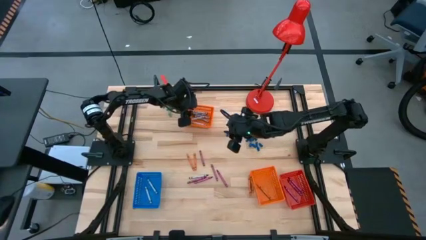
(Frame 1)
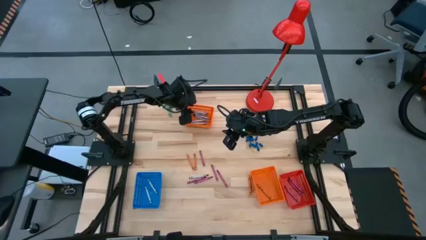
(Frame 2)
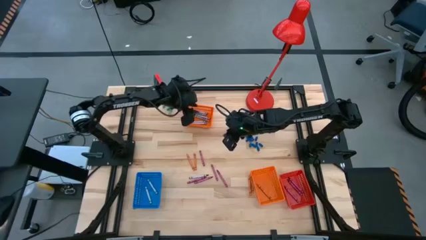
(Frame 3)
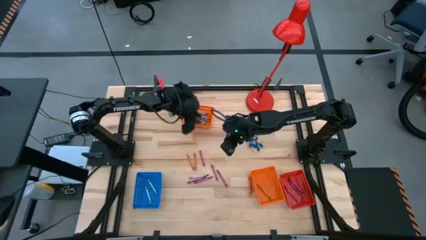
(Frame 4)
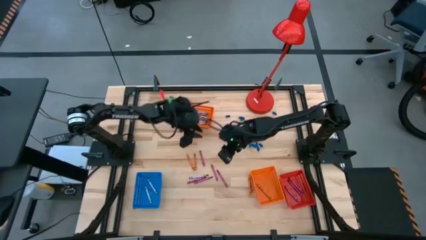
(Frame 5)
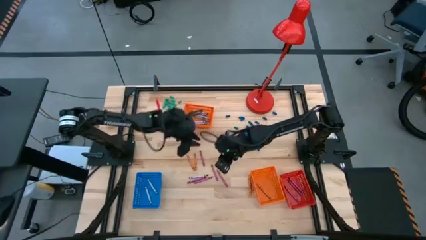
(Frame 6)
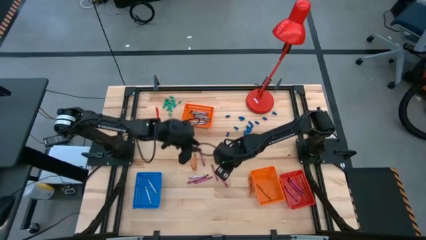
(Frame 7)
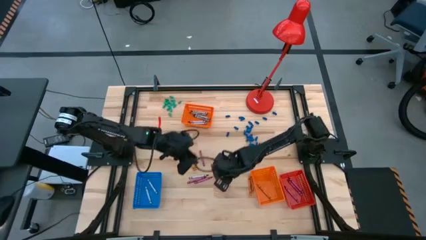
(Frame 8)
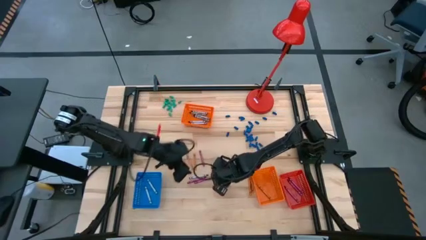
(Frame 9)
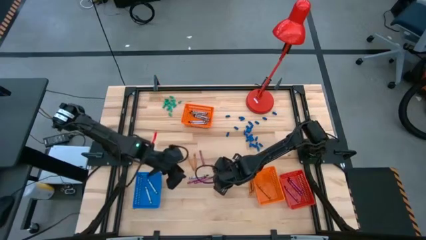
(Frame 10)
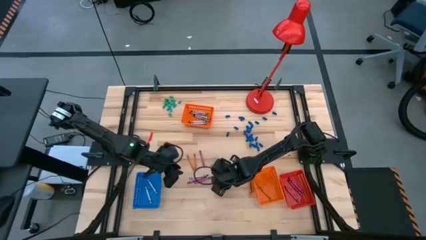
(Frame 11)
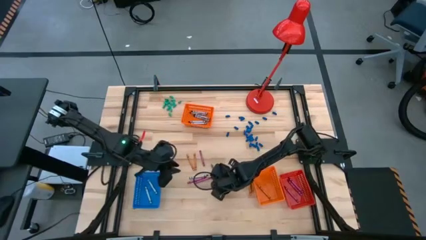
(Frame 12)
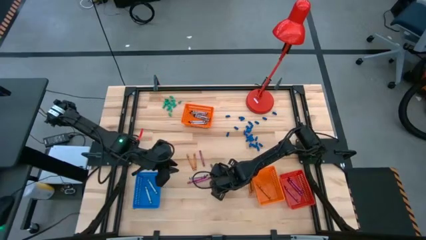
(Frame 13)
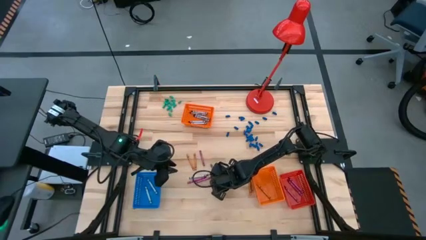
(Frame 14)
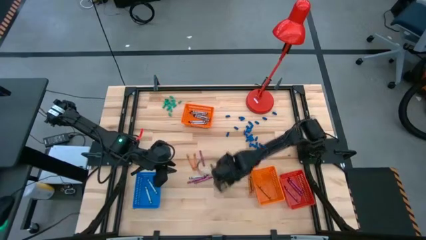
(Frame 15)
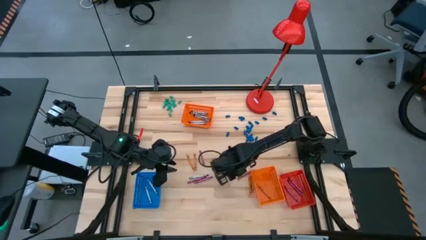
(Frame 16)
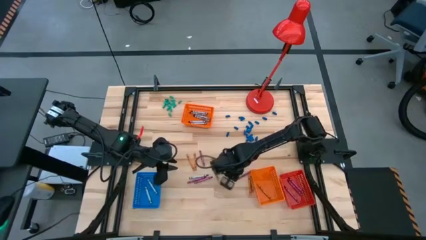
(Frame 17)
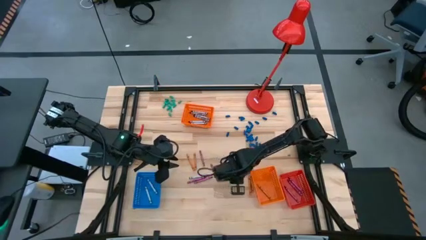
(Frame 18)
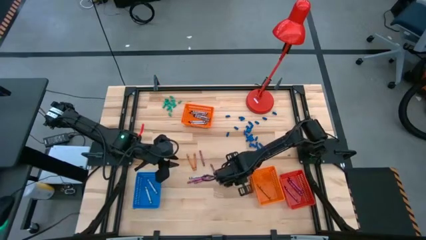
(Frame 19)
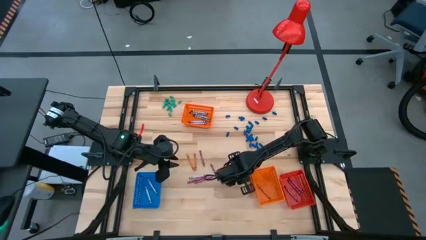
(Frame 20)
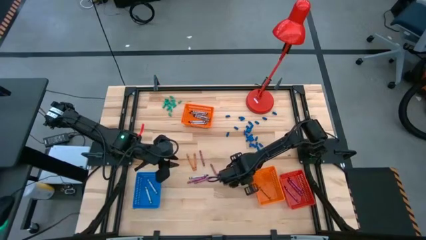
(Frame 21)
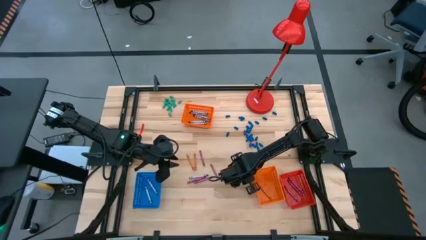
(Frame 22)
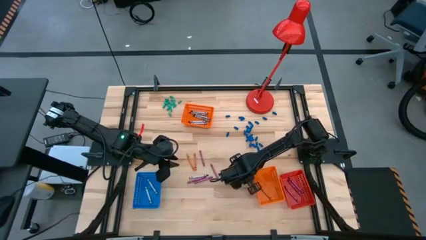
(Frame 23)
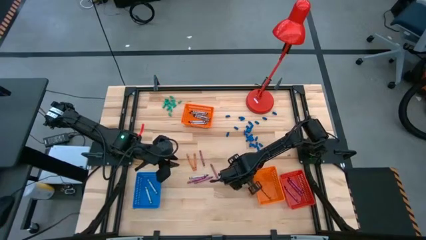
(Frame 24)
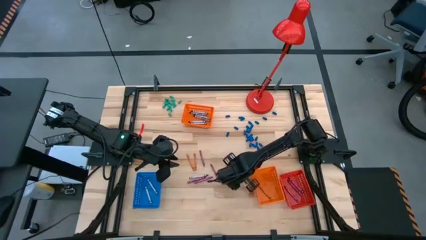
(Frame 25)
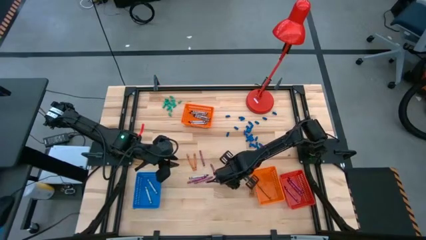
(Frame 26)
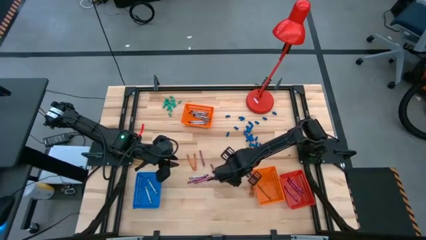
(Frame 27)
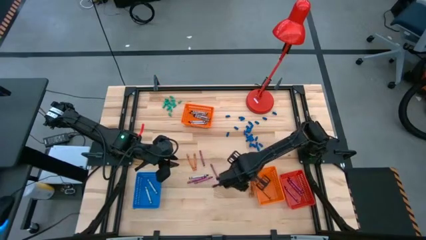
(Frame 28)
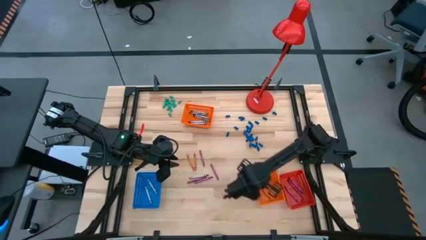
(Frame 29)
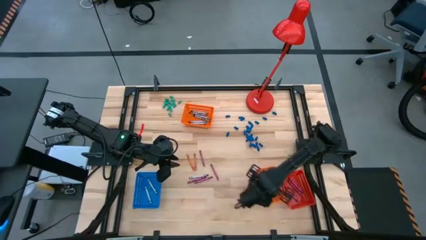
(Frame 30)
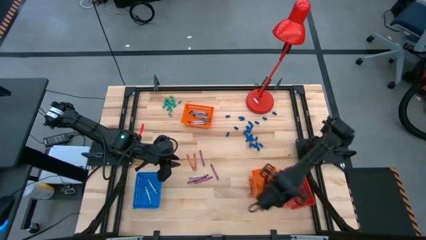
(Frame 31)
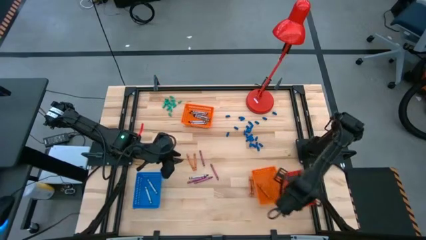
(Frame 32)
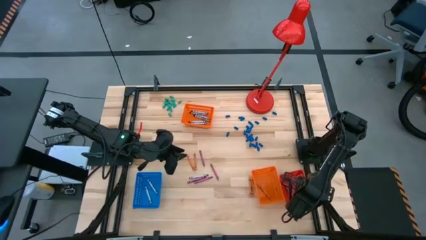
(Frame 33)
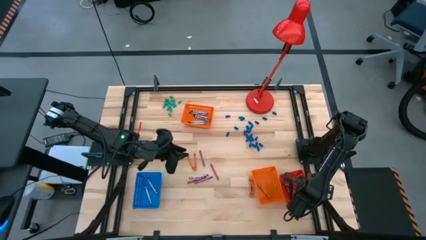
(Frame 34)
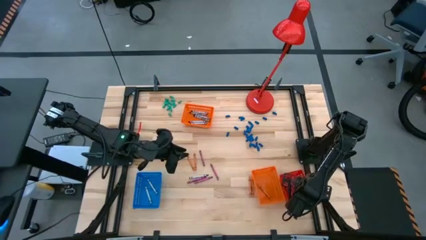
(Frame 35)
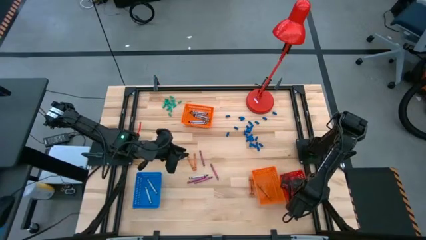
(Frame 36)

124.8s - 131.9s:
Task: Sort crayons
Put the red crayon into the red bin

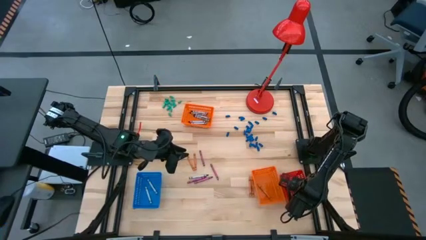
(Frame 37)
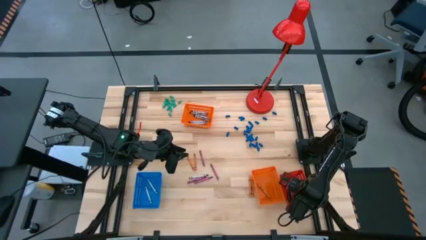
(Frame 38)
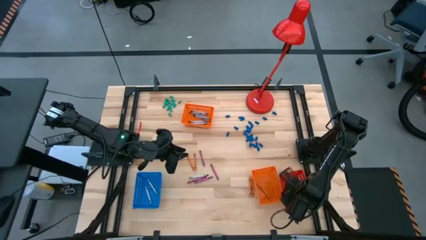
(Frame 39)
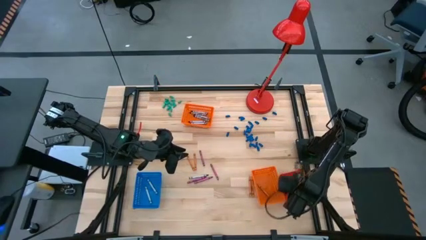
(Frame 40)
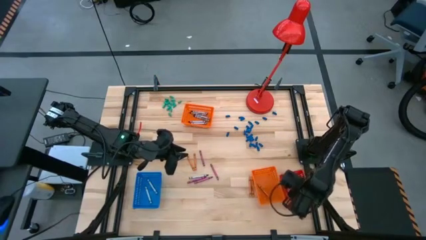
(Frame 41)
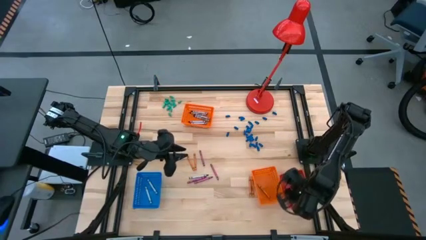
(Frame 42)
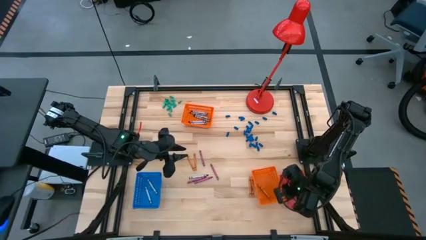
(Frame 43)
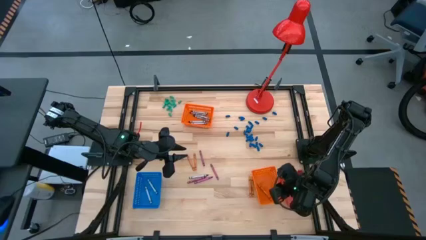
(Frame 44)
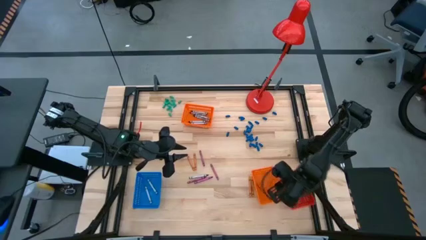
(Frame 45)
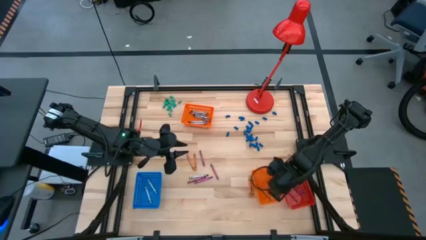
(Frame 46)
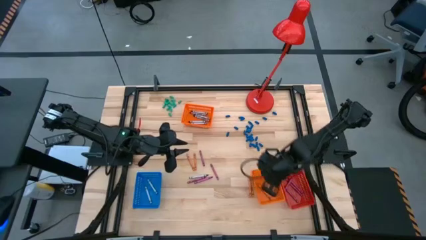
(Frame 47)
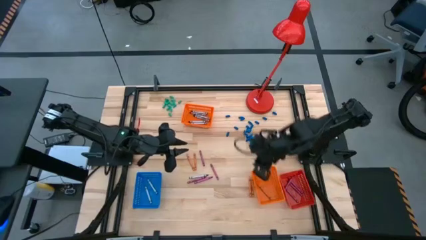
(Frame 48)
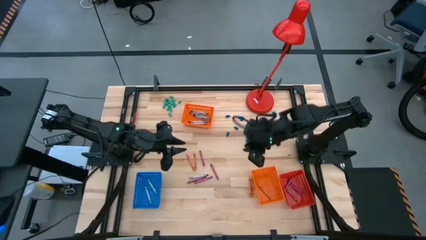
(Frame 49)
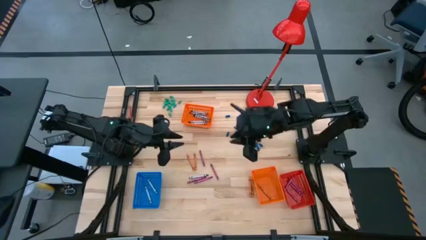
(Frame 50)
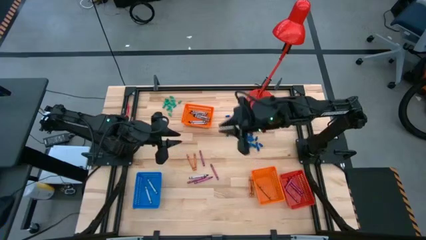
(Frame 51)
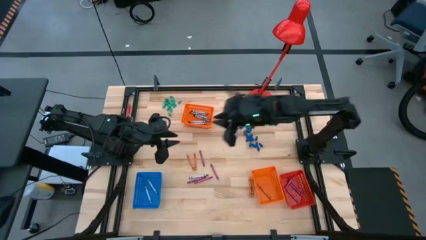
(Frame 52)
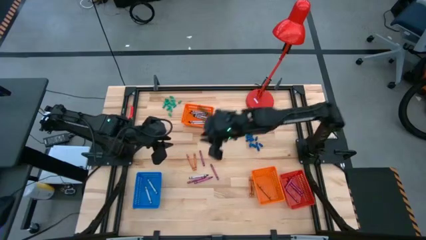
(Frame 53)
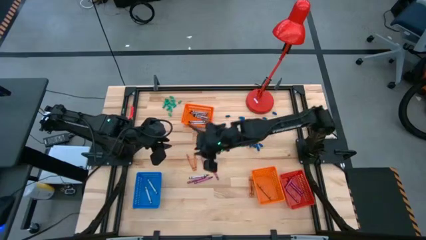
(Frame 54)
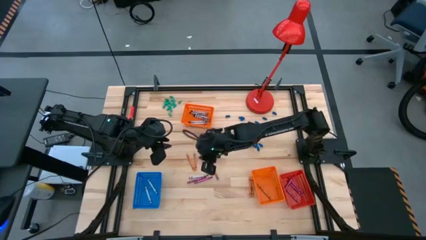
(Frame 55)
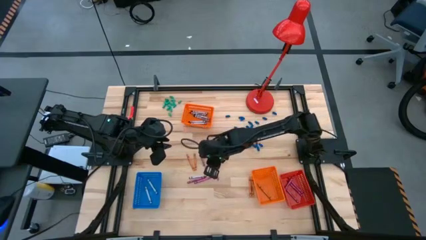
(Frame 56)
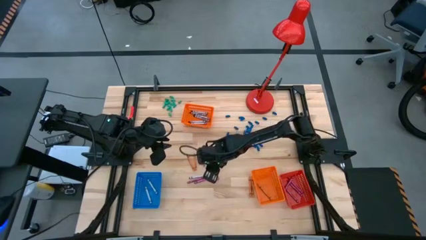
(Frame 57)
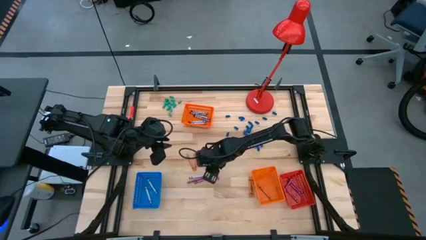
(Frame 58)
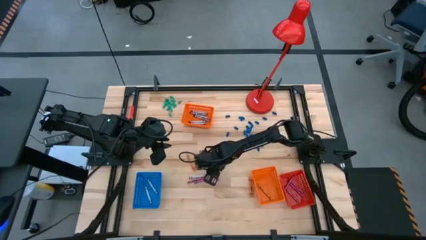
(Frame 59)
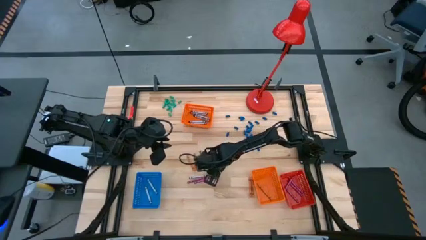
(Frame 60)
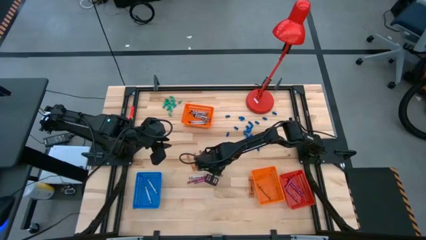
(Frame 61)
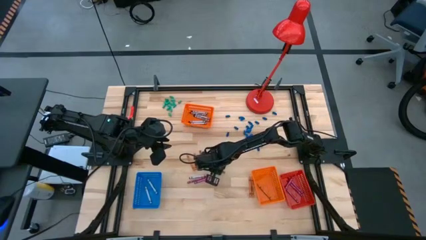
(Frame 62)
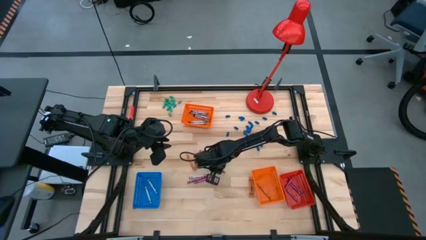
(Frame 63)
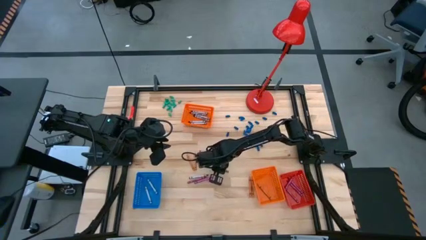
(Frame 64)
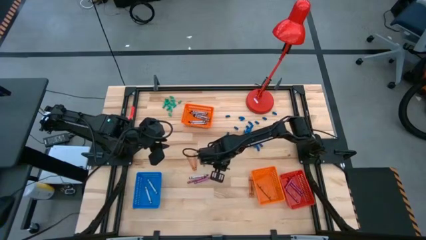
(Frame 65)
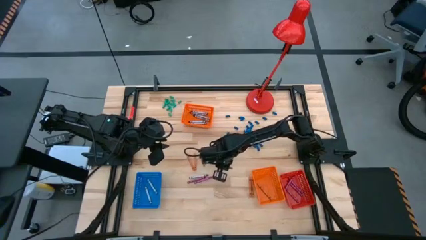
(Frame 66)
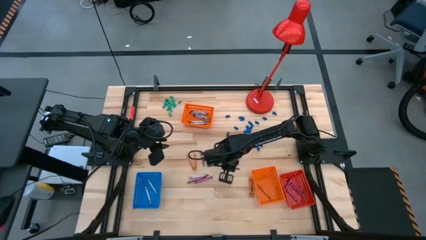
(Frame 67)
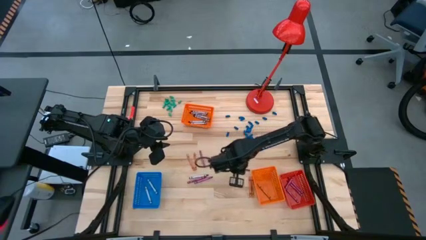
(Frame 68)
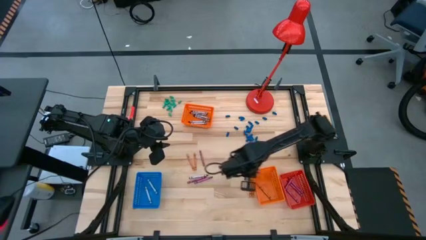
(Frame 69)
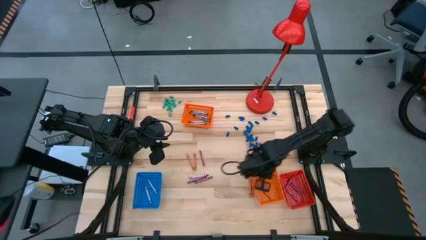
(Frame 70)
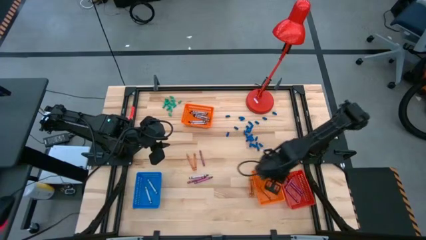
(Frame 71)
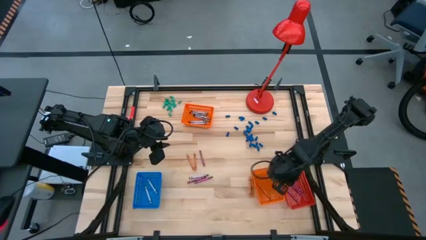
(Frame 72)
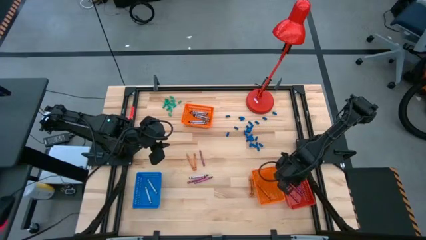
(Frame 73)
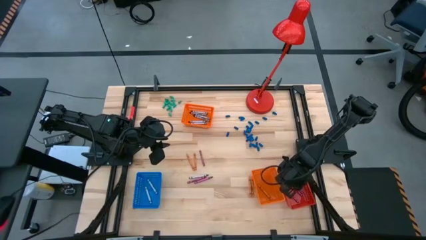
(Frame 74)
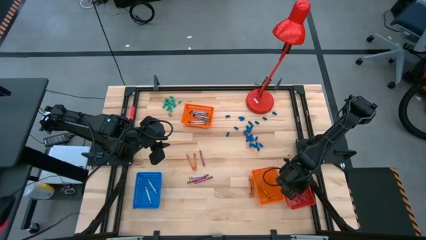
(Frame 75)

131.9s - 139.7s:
Put the red crayon into the red bin

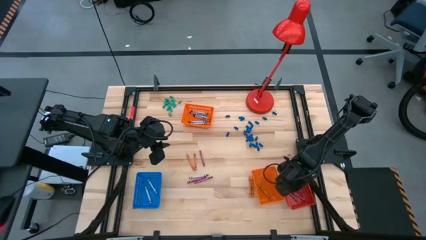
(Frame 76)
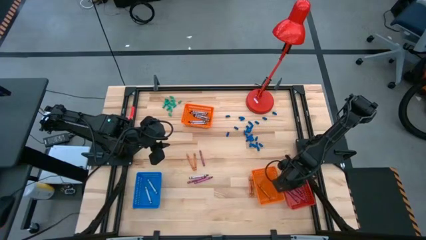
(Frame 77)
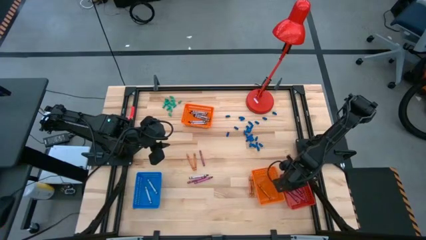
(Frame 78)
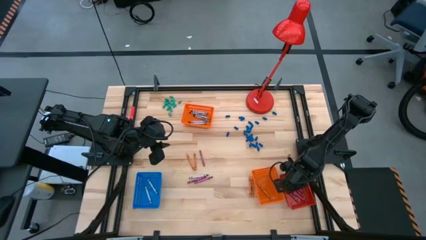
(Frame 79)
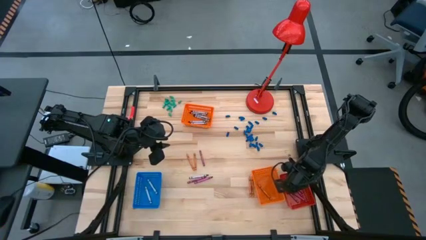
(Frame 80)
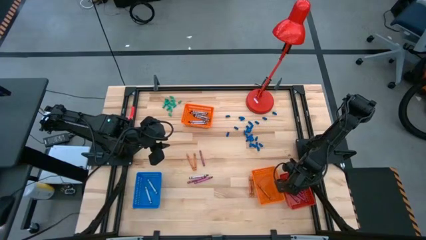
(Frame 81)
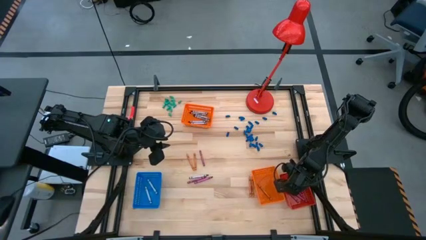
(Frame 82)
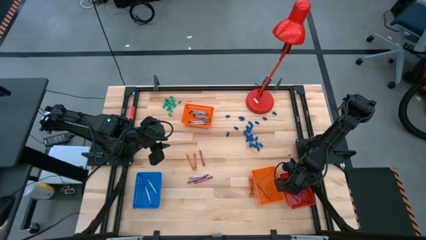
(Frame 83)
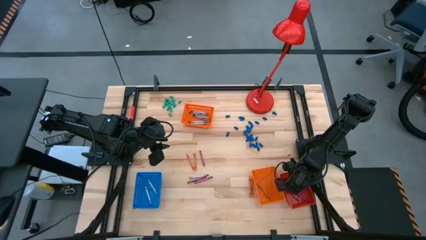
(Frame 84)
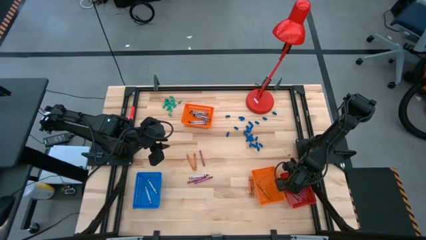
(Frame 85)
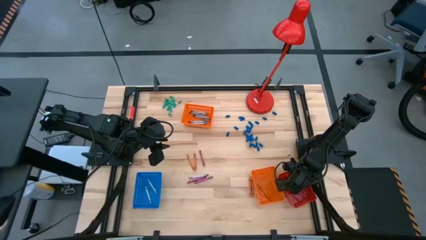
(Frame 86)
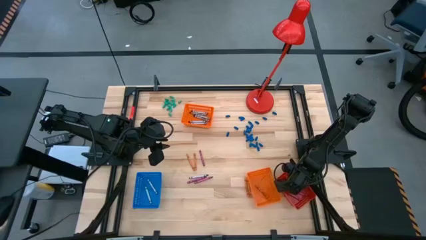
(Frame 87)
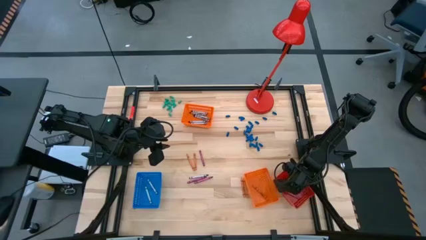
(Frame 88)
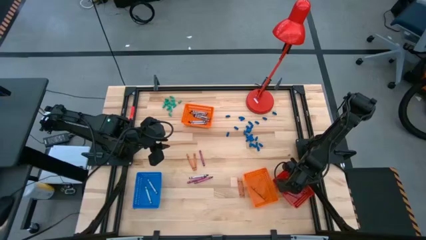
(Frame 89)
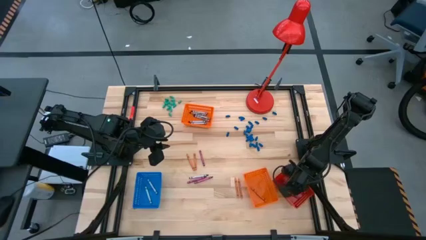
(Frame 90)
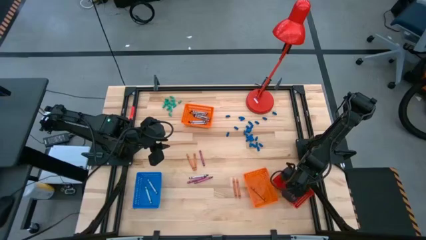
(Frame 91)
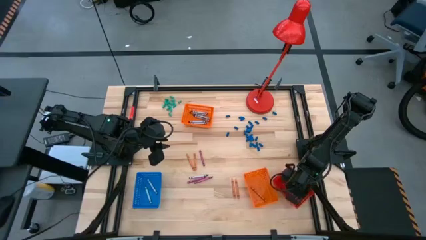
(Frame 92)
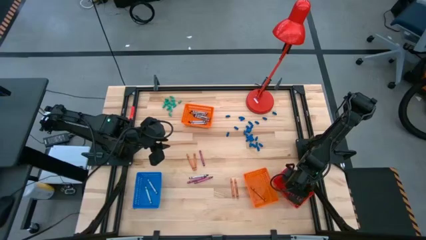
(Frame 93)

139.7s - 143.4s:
Adjust the red crayon
